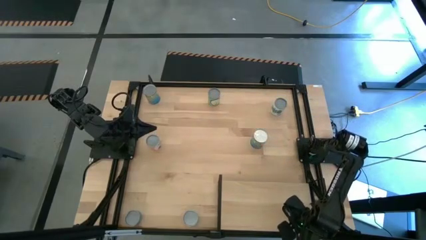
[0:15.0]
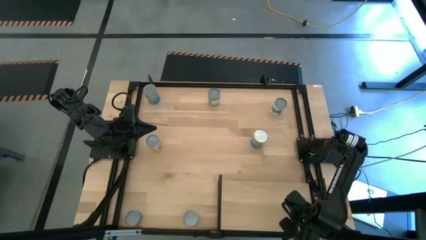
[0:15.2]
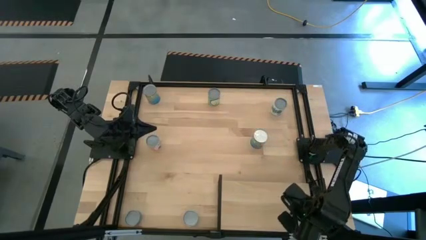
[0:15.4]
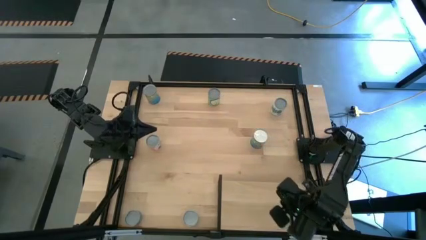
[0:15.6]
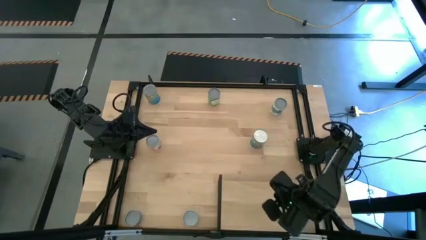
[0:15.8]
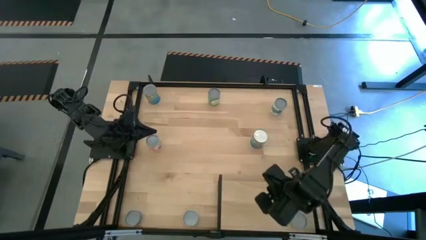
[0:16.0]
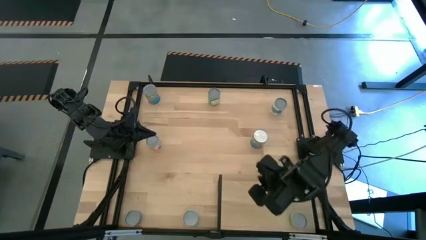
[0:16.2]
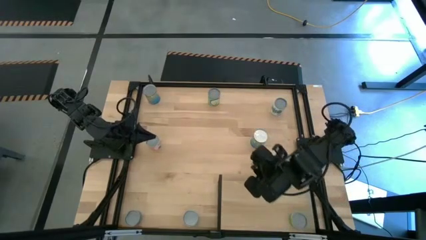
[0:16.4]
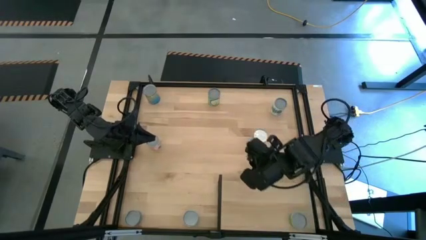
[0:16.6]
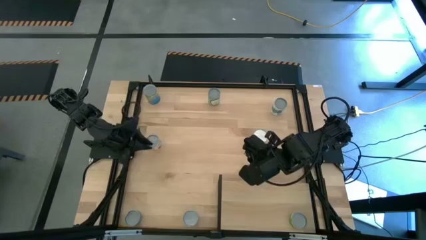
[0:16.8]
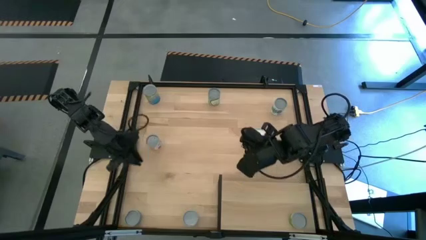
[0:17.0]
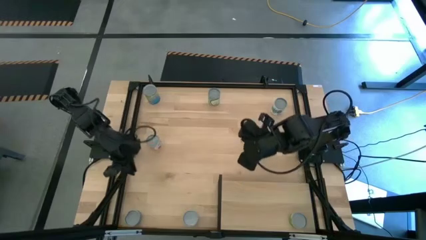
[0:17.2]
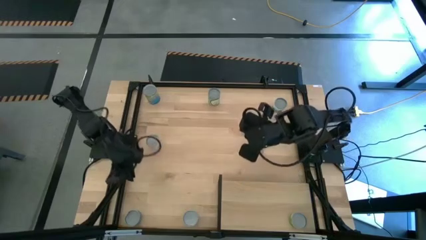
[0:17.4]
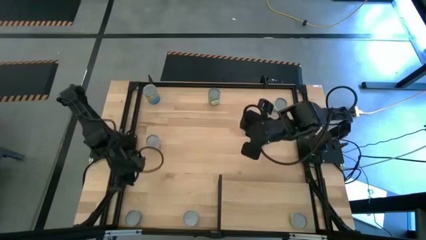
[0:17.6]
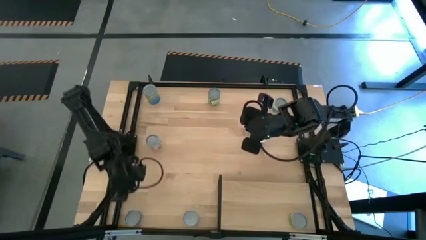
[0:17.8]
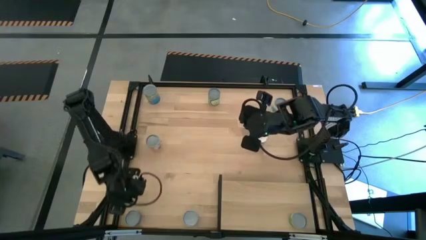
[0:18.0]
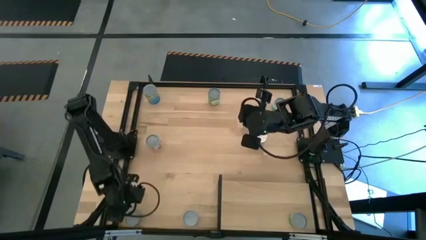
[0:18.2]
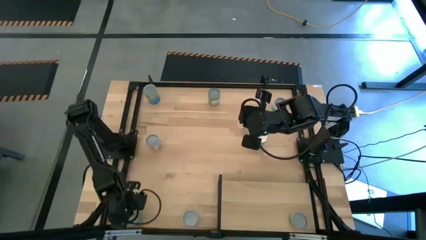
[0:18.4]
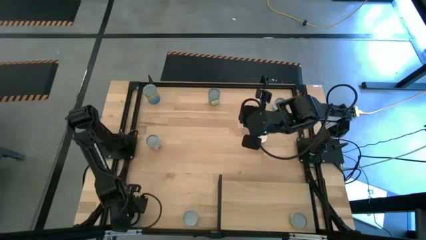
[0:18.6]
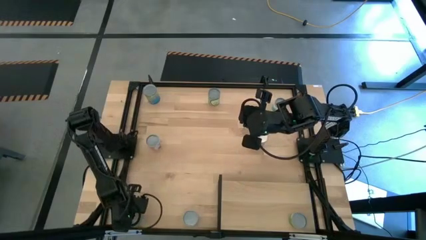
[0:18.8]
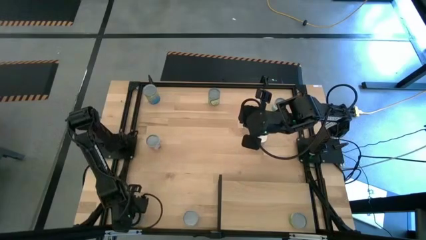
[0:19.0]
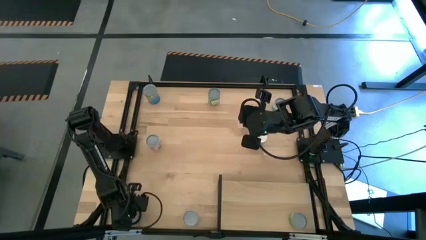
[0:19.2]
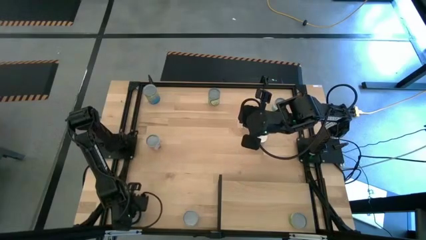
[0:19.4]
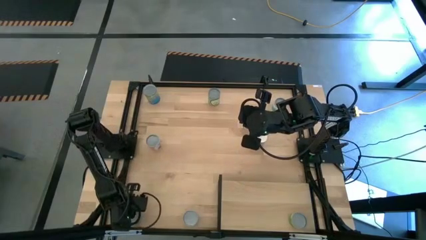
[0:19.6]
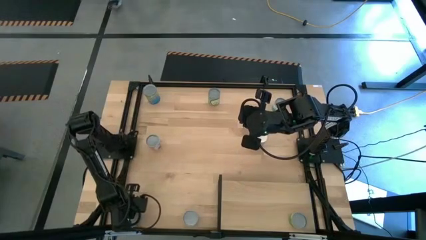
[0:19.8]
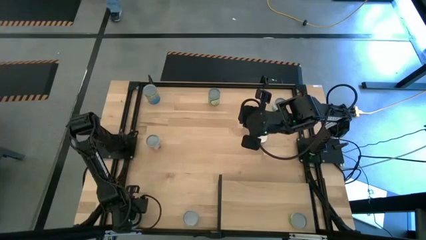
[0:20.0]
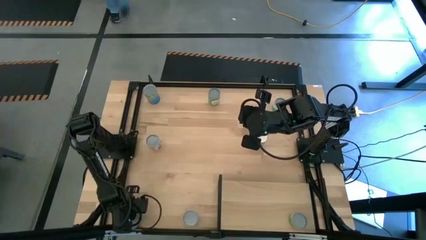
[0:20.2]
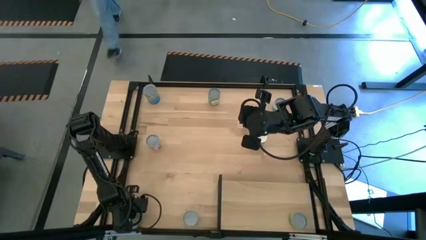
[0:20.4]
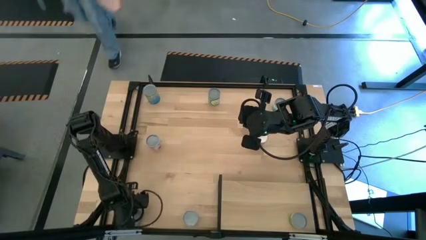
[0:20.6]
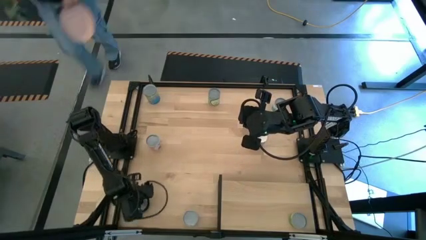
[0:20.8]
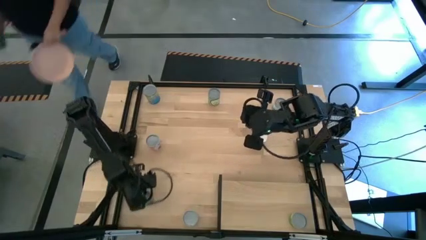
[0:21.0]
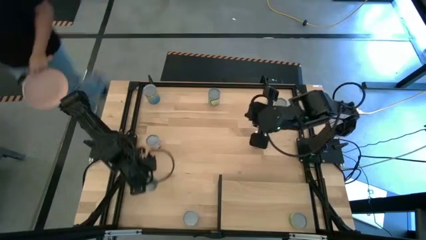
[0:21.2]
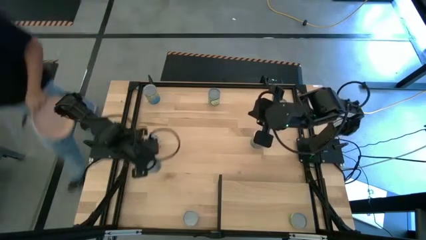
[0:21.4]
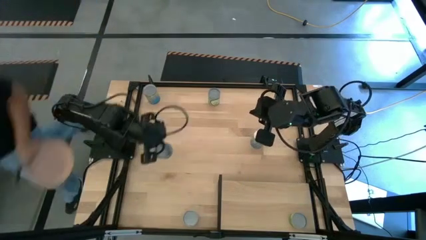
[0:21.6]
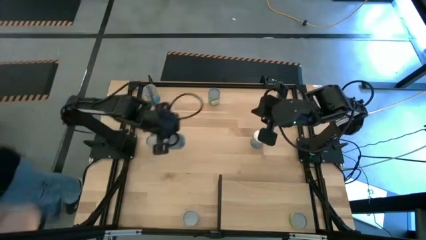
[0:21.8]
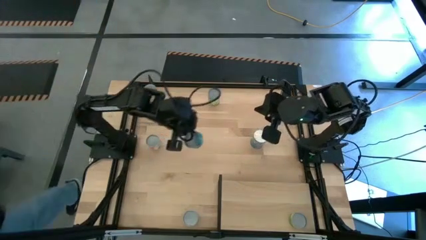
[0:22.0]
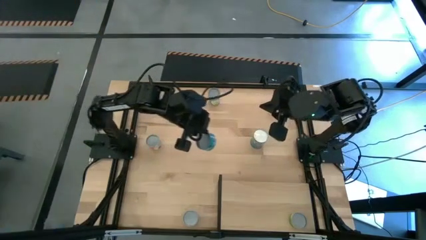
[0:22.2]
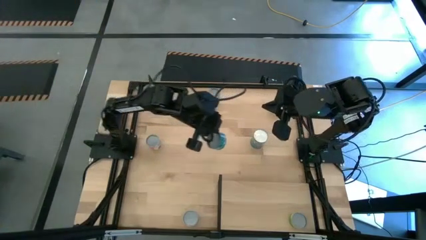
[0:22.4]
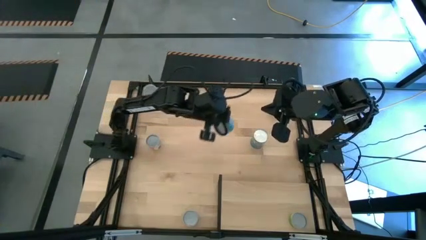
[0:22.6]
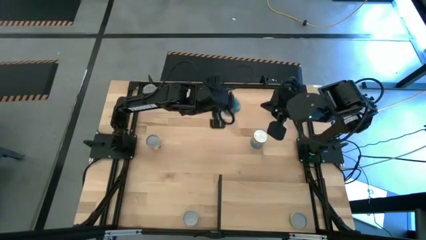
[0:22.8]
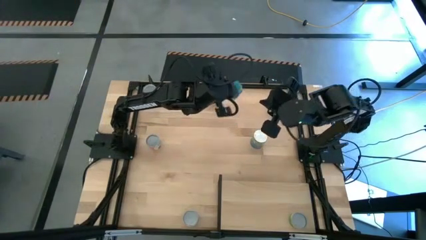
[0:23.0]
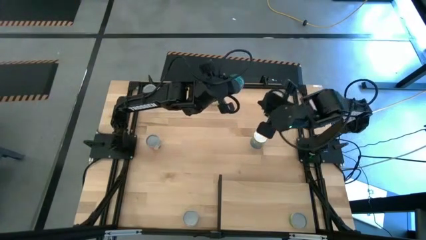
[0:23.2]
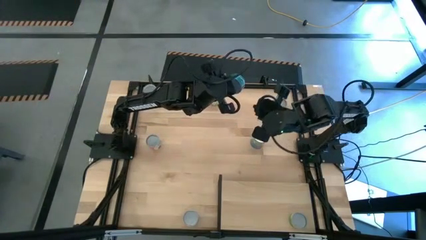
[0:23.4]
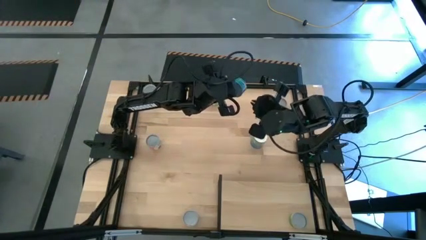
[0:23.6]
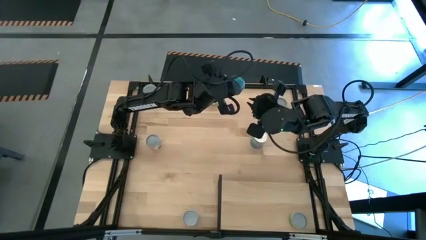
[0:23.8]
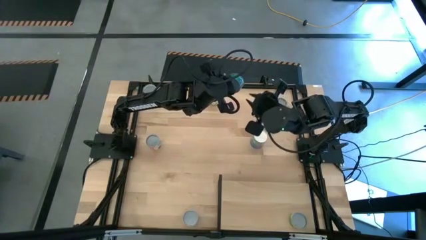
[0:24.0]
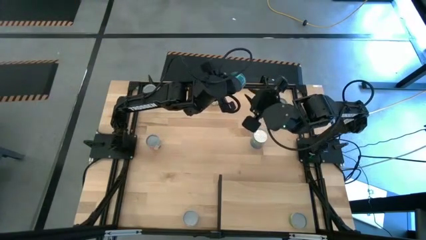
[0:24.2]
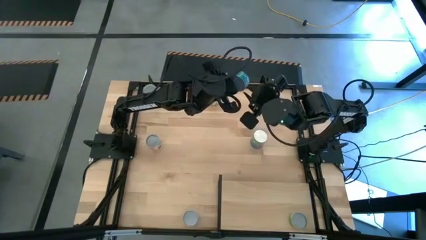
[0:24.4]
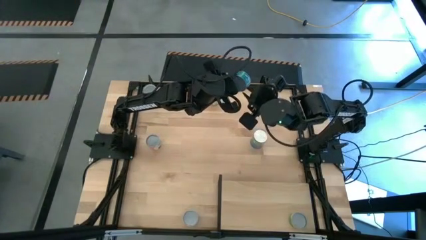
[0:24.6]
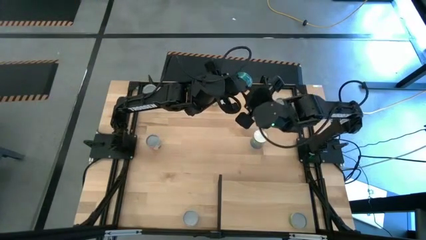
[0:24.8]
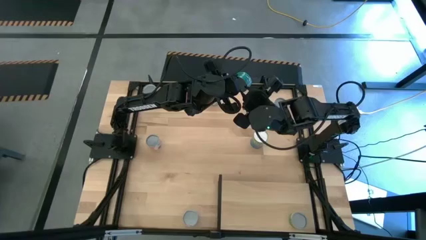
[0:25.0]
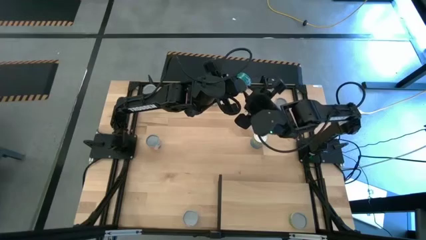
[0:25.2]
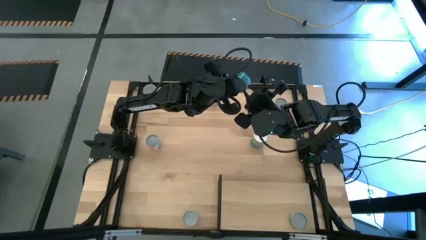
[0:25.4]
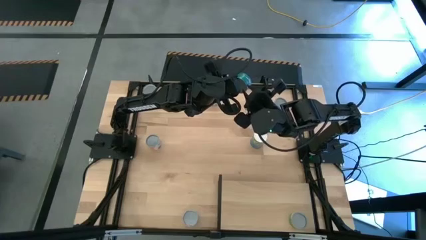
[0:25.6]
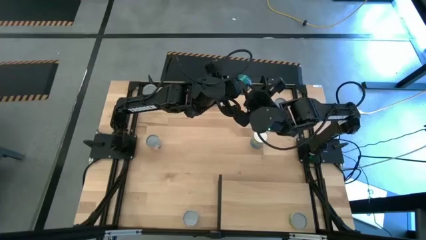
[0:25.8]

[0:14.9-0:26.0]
Task: Pick and place cans onto a shelf
Put the canned tuna on the shelf
